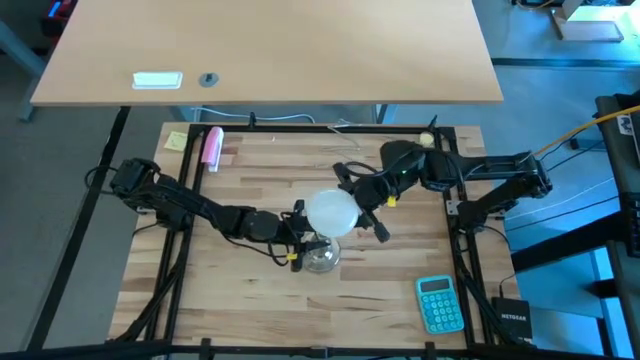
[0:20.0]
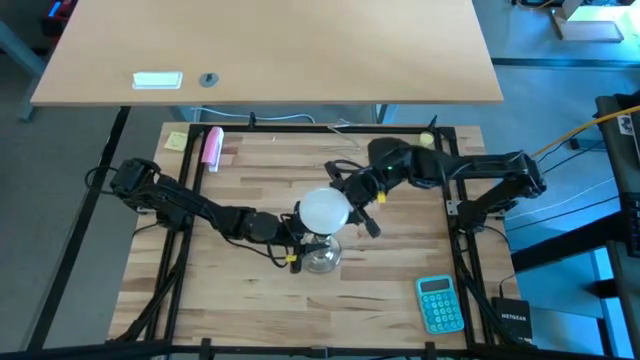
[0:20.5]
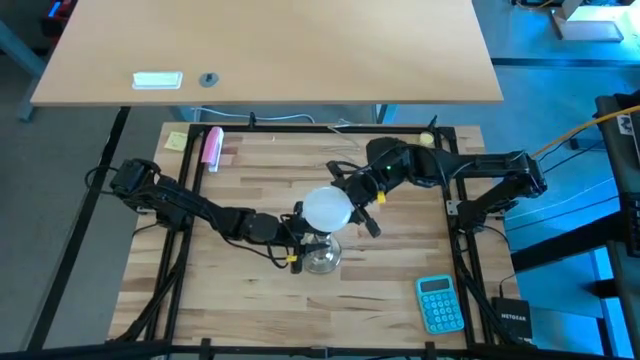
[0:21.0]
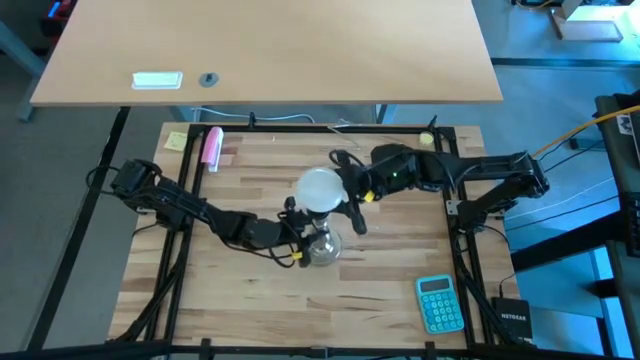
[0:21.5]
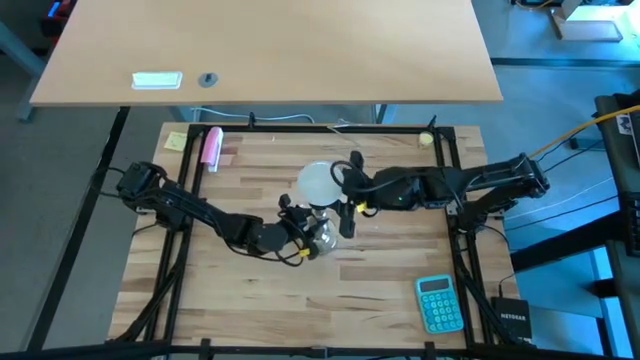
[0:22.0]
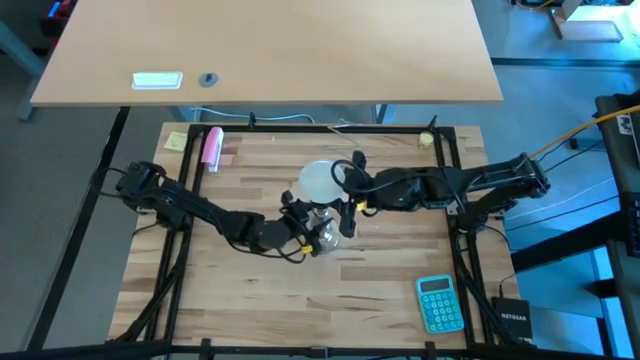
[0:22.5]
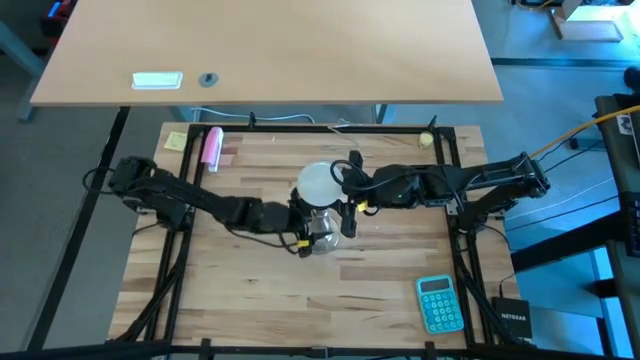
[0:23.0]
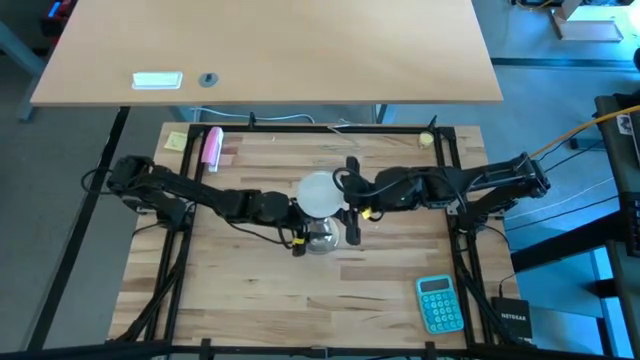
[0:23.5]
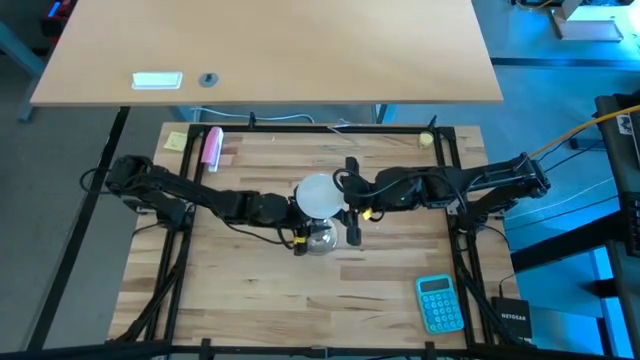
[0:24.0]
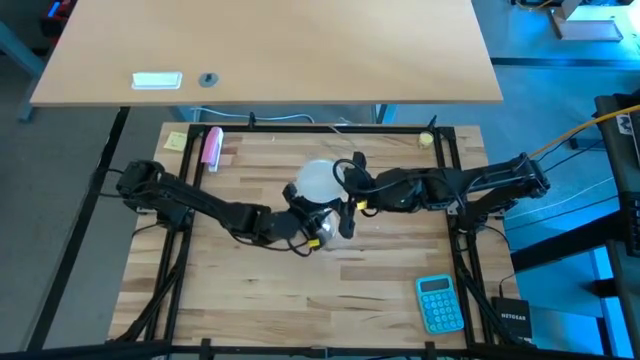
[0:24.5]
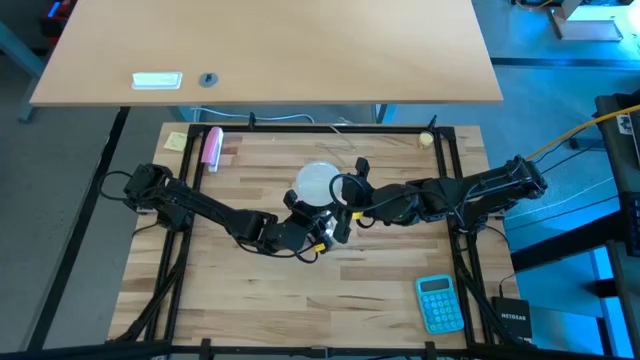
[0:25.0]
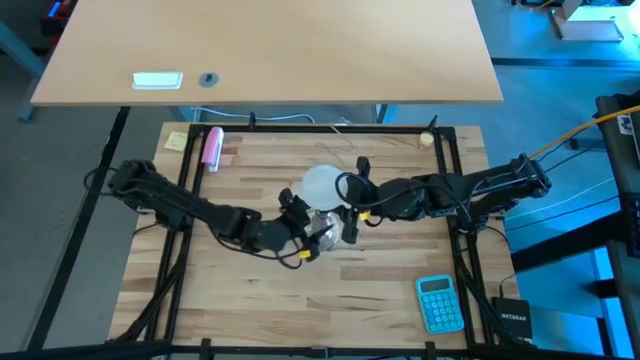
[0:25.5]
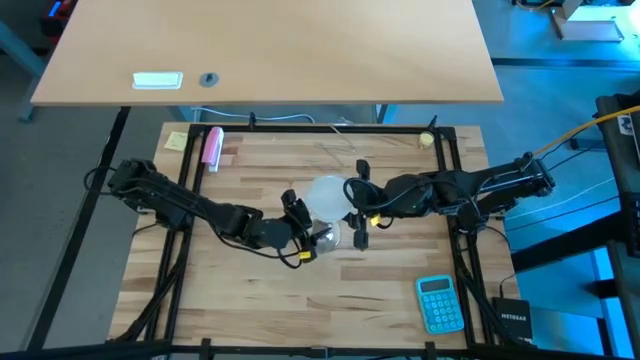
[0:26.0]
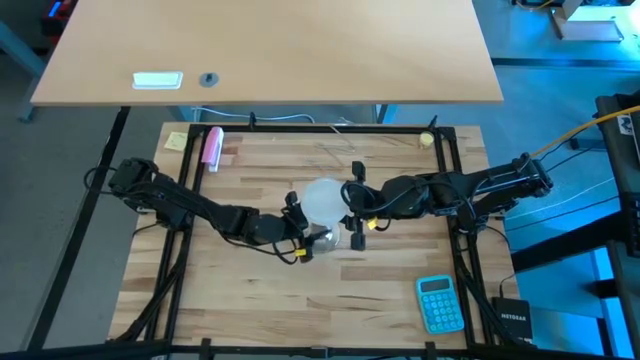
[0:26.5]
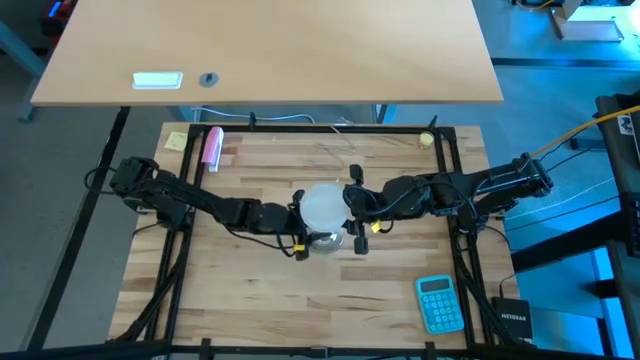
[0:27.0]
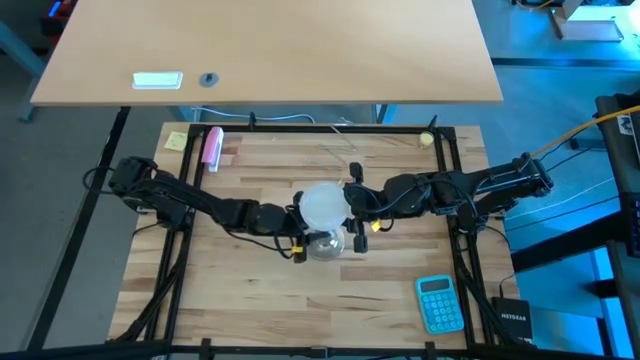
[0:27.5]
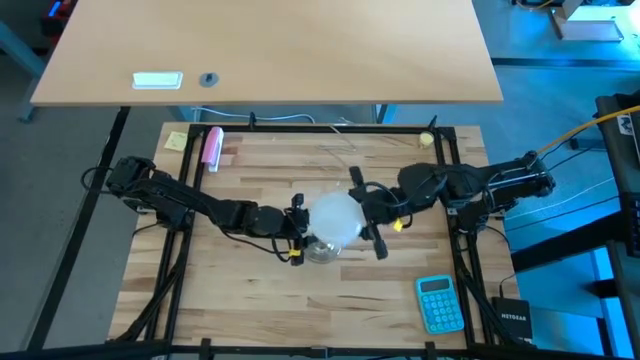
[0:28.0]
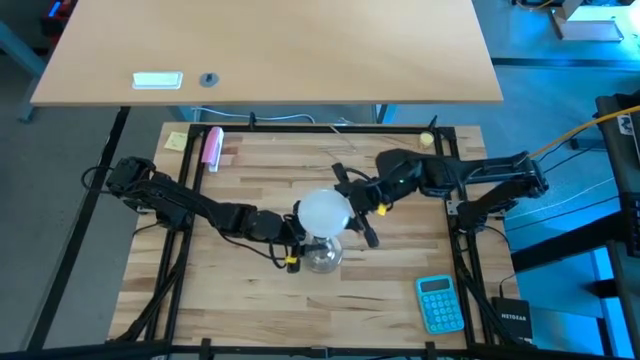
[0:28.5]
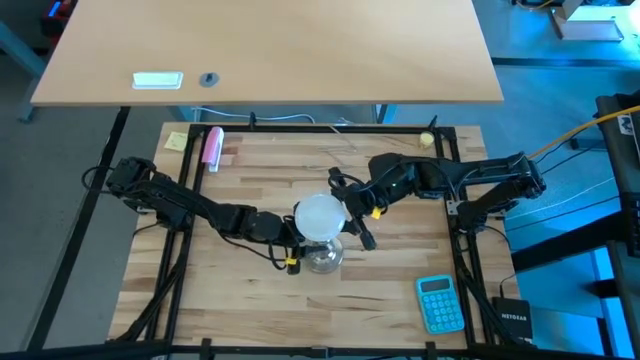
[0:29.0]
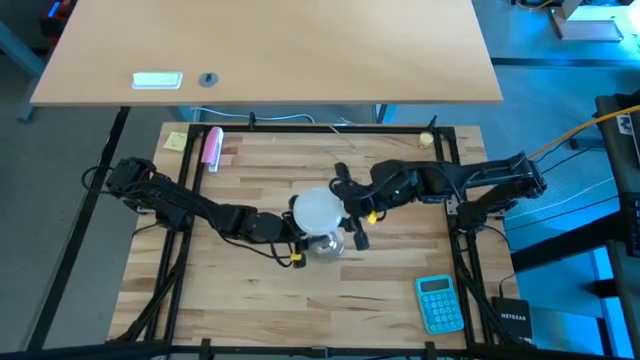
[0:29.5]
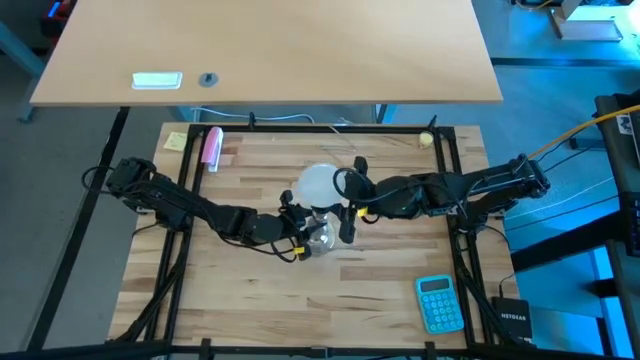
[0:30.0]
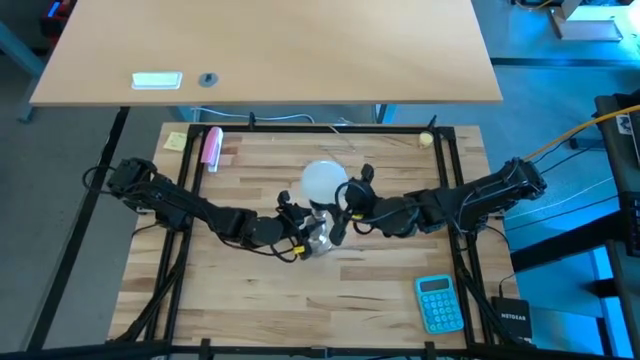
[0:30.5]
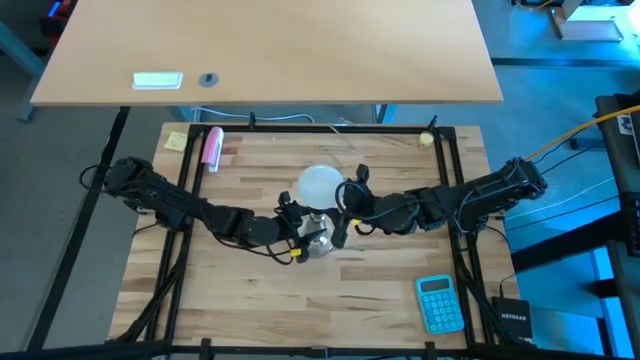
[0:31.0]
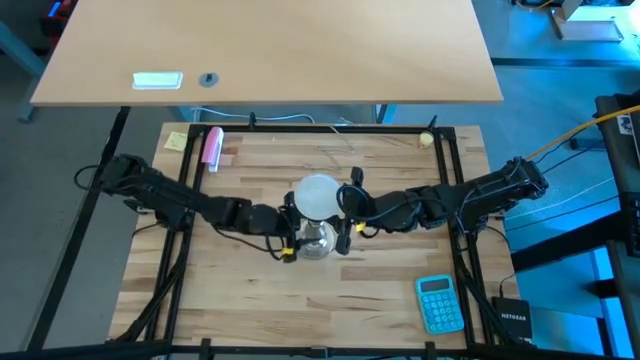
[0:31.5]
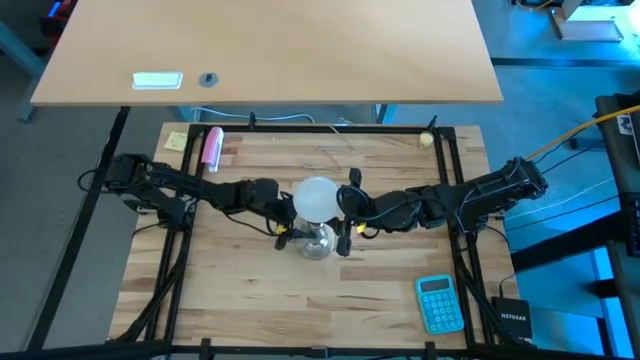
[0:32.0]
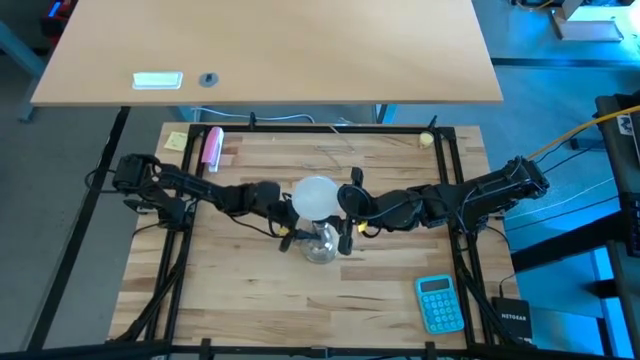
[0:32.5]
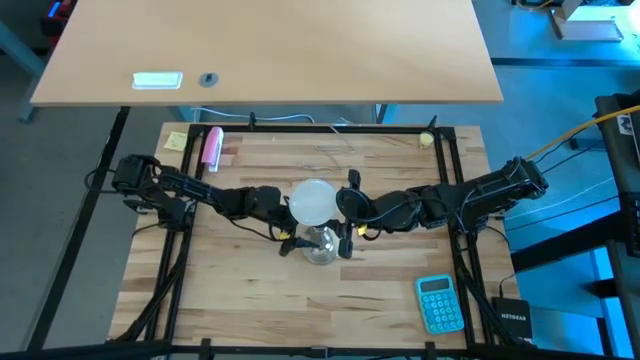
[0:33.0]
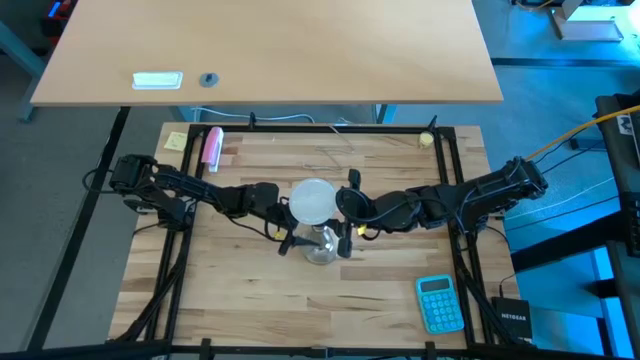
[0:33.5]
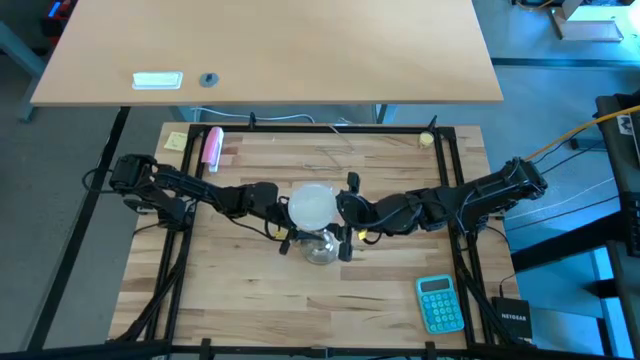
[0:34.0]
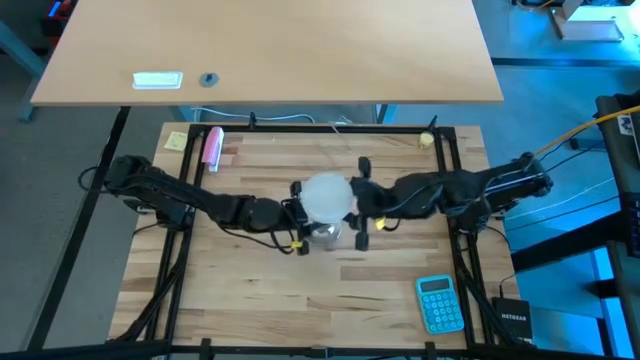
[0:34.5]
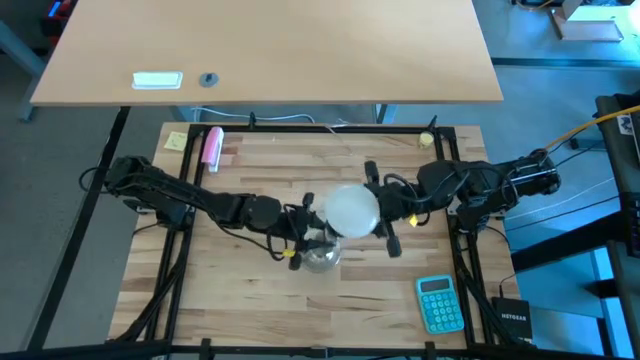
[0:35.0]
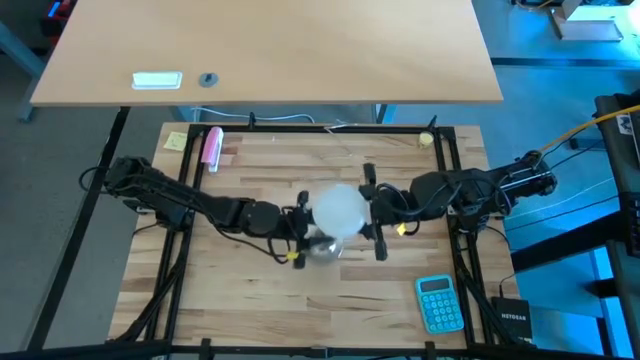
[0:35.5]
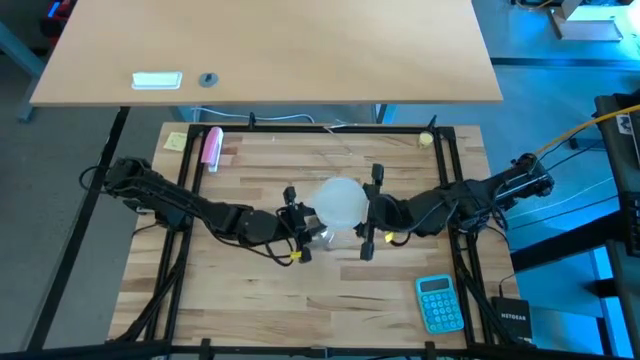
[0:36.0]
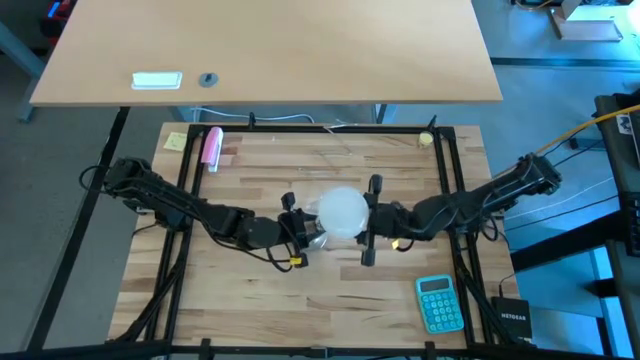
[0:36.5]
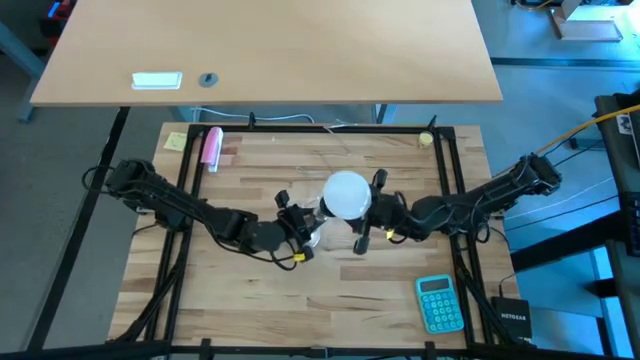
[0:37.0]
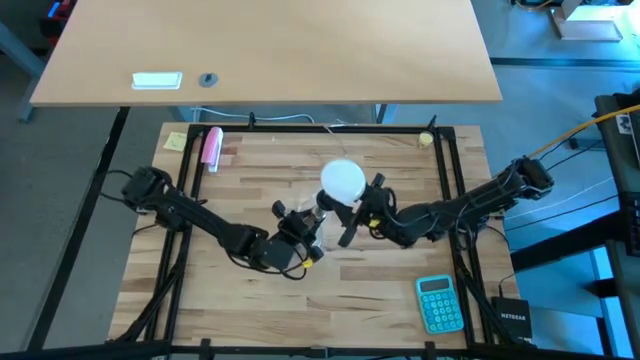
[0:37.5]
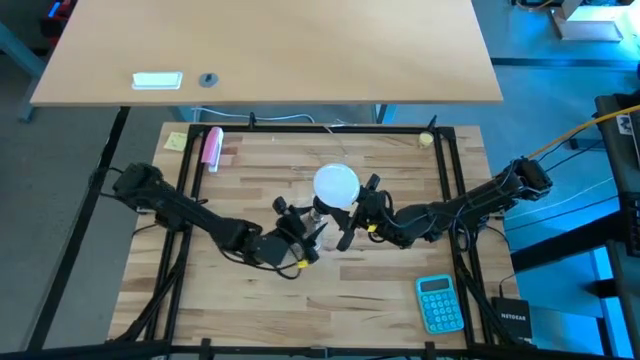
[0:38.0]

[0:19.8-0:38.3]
Task: Screw lightbulb
Insert the light bulb into the lamp

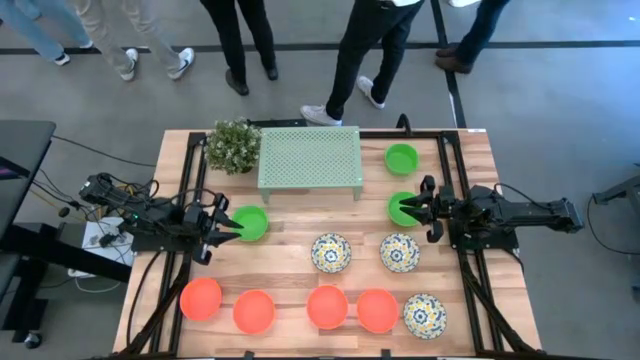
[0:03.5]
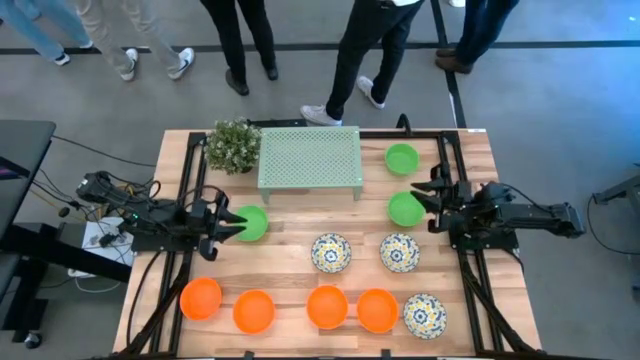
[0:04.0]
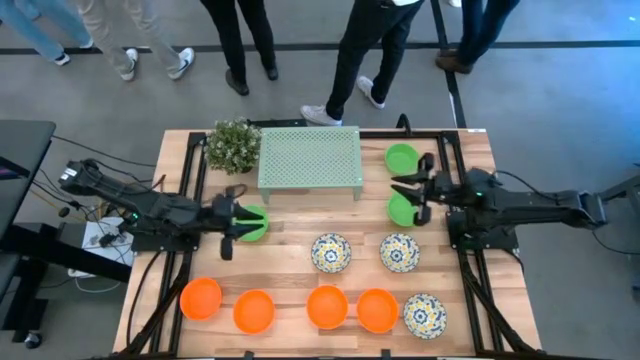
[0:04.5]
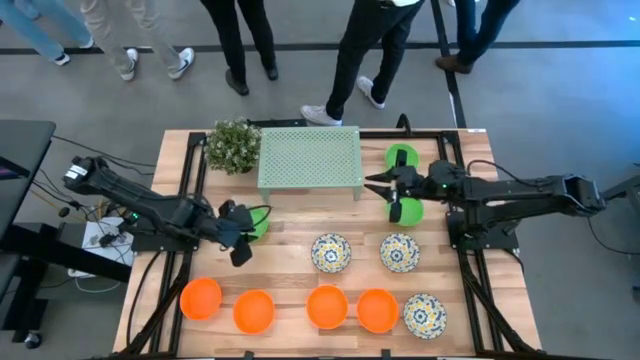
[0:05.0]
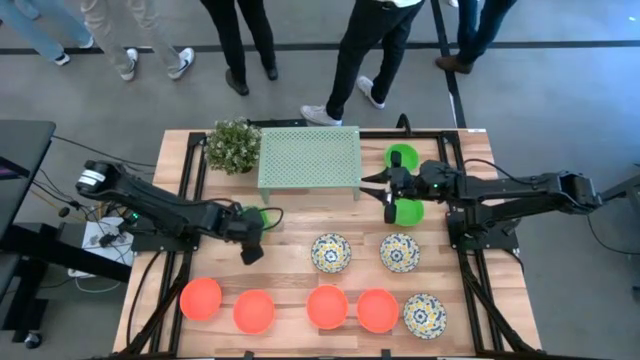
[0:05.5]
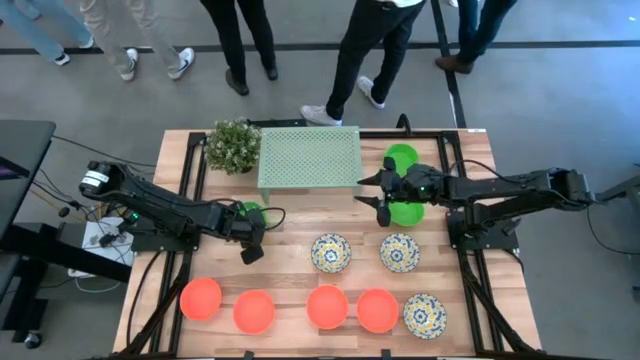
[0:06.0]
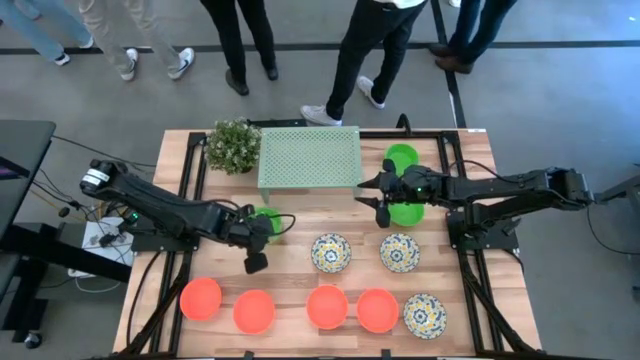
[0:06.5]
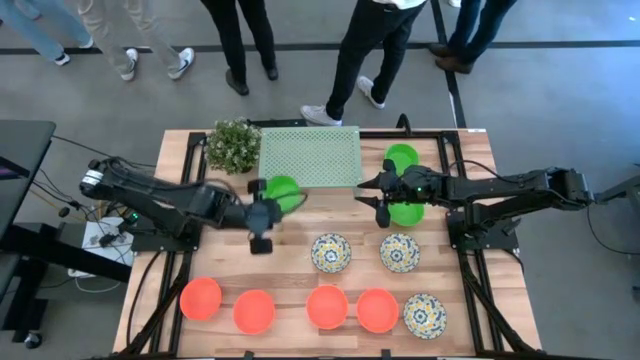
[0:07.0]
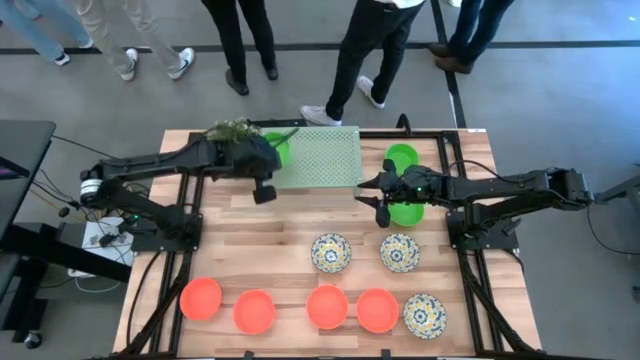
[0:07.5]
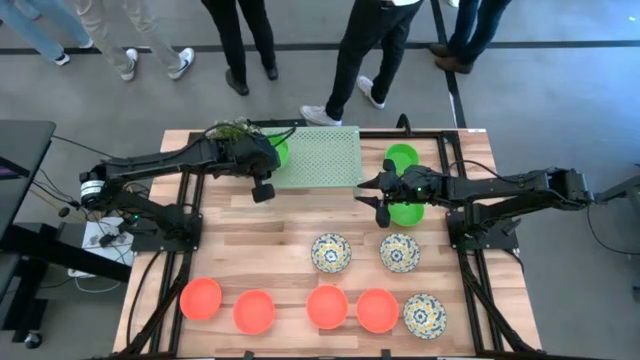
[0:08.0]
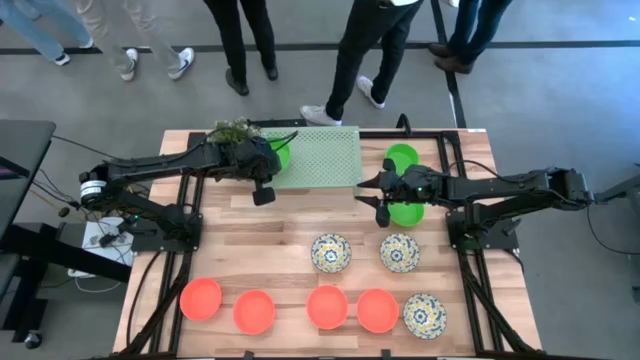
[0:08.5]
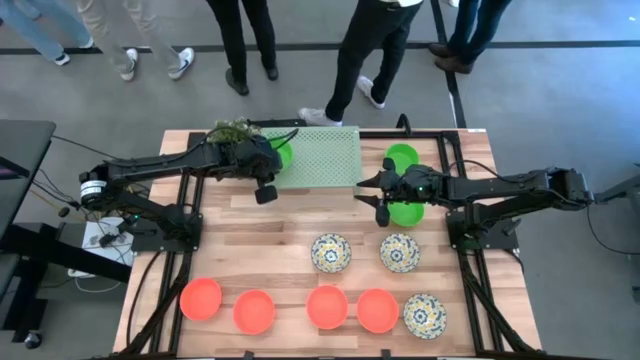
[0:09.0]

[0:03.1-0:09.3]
Task: Pick & Place Mini bowls
Put the green bowl on the shelf
